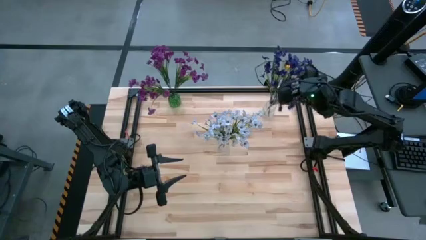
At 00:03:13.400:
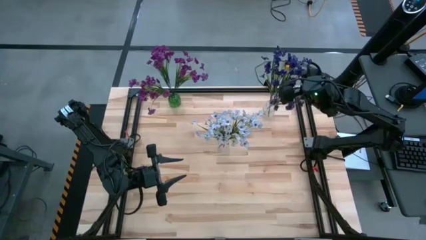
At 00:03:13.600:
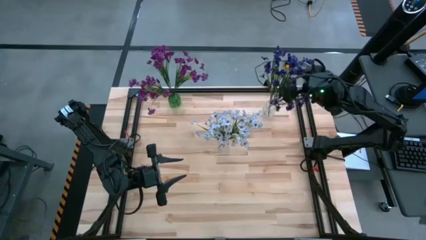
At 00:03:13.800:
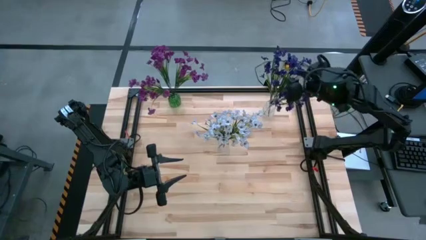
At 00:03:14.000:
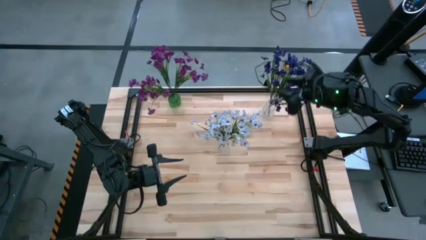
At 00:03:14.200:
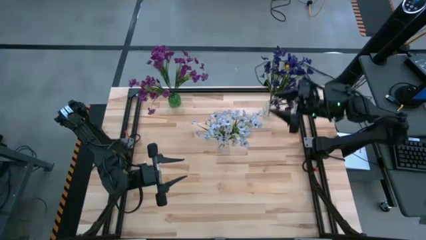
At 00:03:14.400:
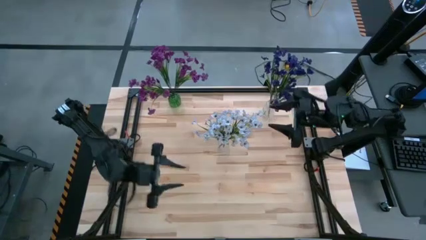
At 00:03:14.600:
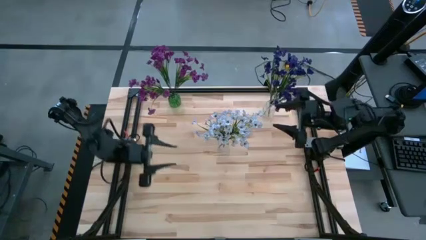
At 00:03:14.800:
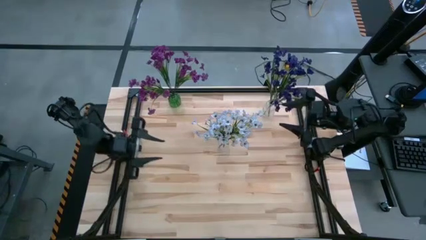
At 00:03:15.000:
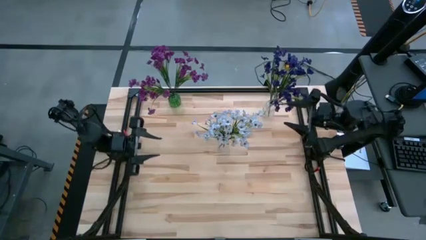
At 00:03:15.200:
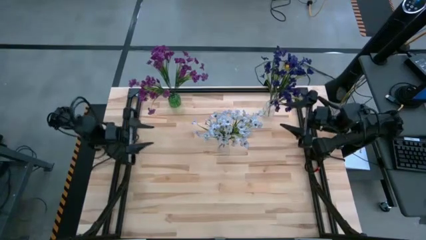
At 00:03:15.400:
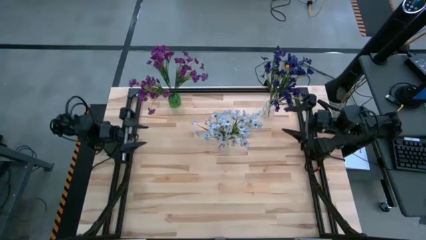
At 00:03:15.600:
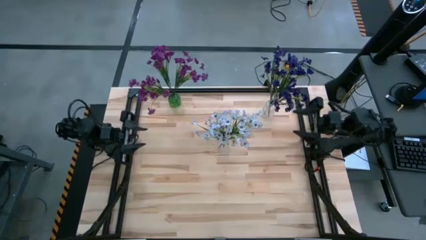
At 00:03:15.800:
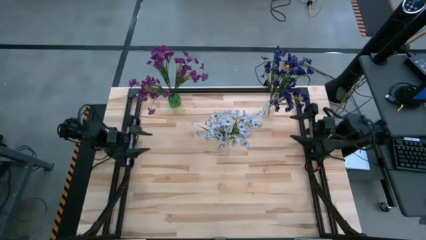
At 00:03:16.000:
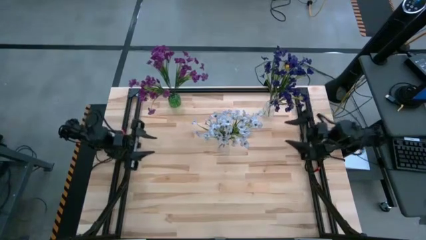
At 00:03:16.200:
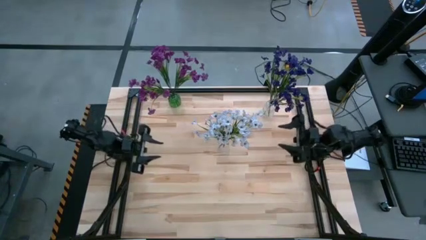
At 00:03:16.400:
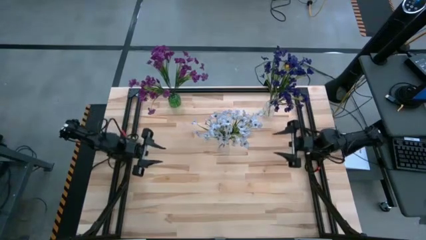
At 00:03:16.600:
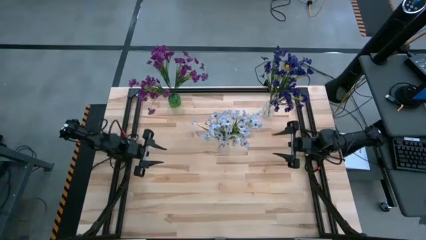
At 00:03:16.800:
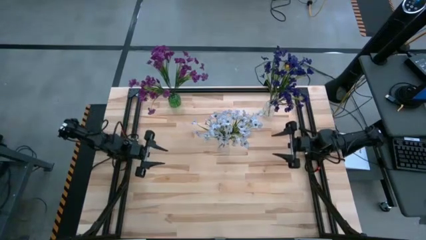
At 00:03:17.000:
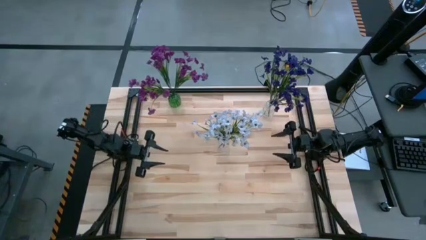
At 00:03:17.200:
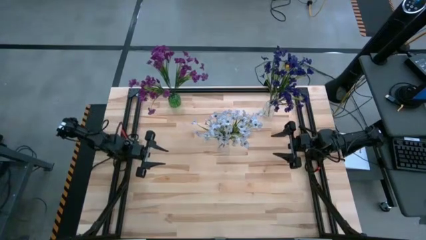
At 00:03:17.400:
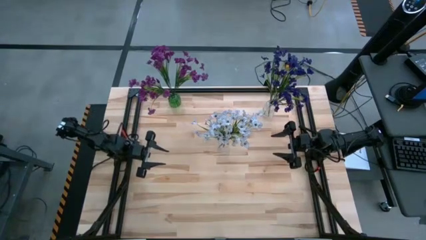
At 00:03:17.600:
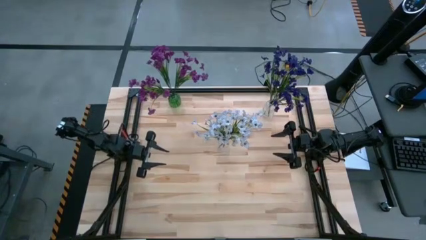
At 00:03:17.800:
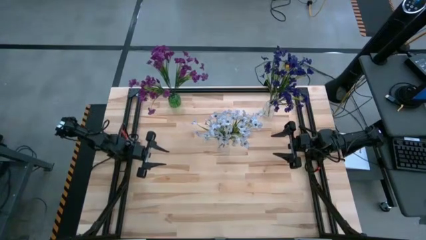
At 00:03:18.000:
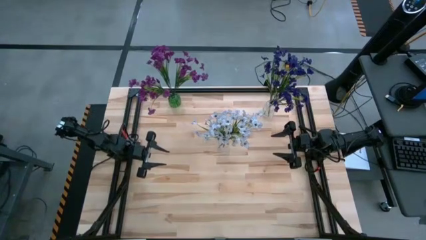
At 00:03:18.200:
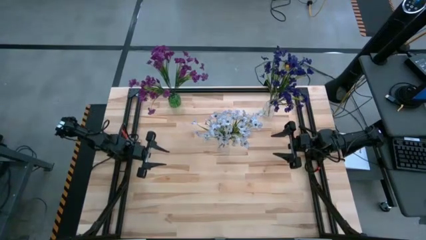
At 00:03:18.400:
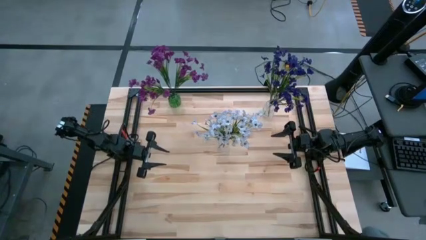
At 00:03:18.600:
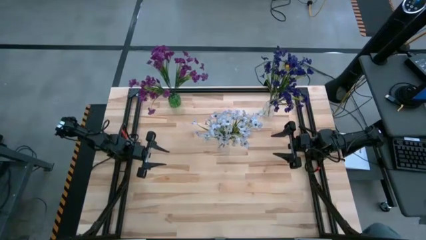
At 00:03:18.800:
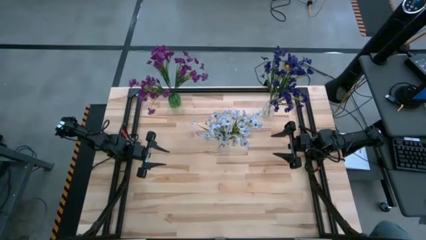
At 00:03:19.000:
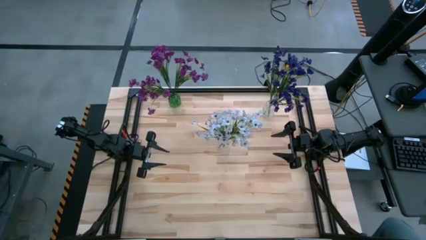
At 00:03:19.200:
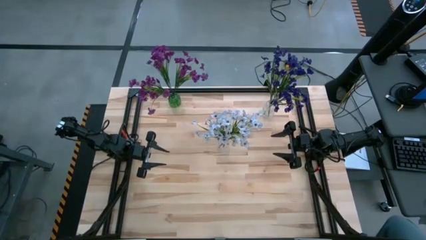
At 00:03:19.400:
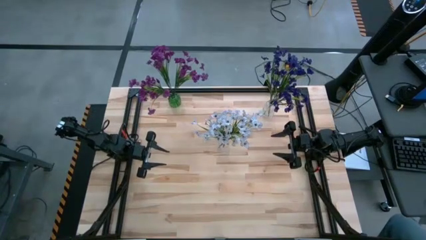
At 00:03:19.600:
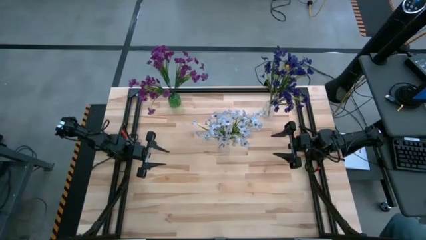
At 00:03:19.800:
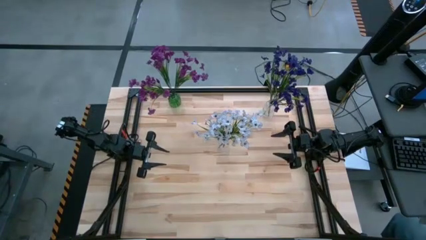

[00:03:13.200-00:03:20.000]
Task: Sort flowers into vase by color
Return to Home Position

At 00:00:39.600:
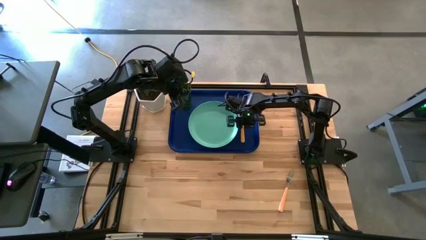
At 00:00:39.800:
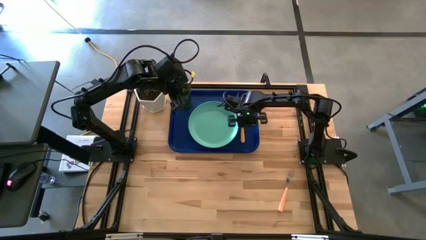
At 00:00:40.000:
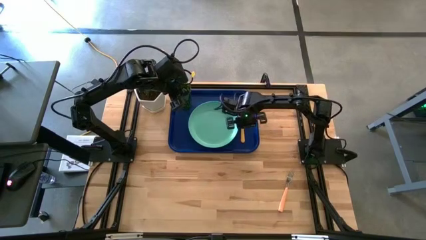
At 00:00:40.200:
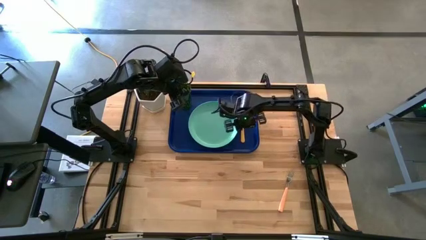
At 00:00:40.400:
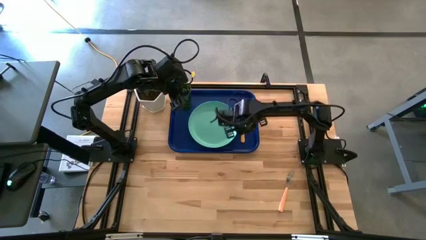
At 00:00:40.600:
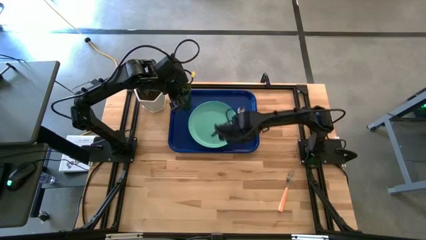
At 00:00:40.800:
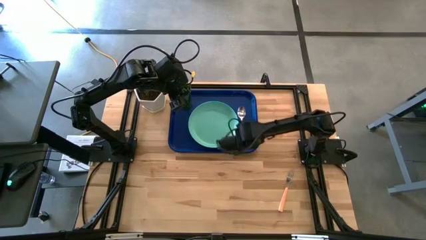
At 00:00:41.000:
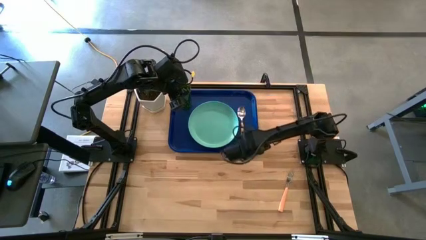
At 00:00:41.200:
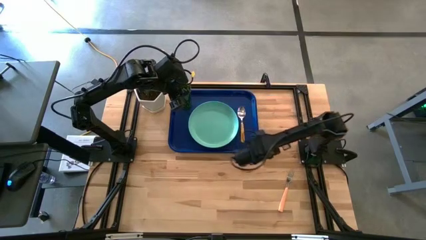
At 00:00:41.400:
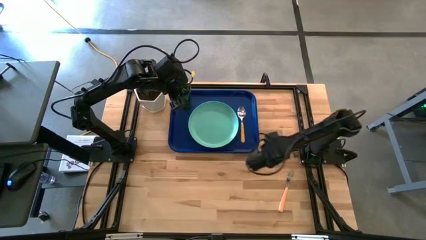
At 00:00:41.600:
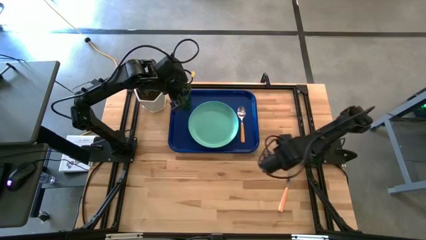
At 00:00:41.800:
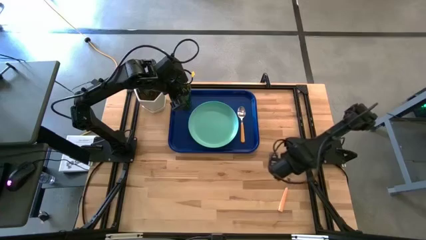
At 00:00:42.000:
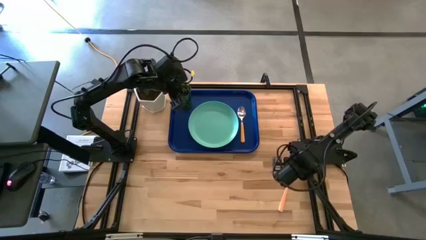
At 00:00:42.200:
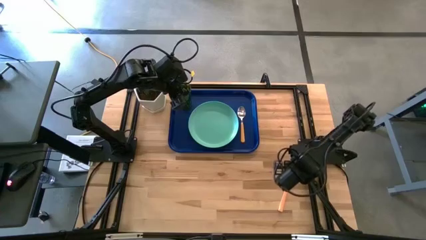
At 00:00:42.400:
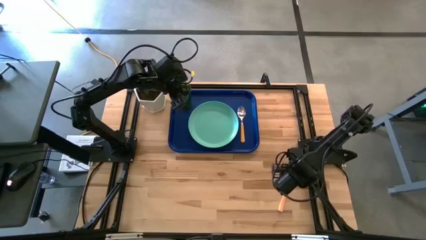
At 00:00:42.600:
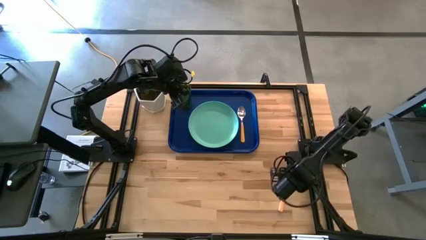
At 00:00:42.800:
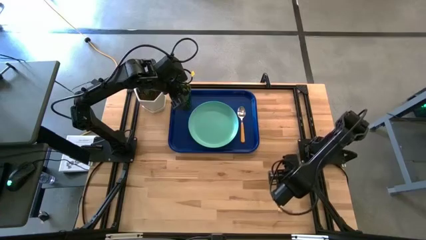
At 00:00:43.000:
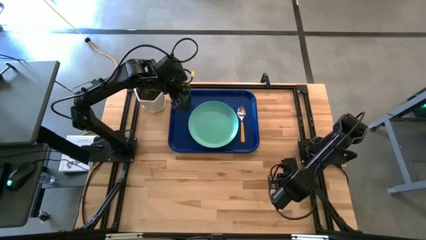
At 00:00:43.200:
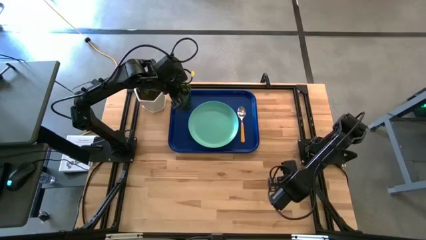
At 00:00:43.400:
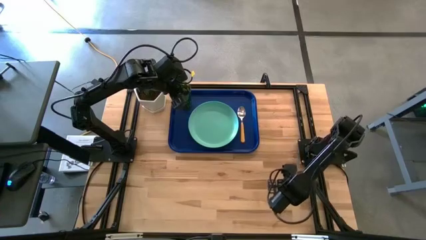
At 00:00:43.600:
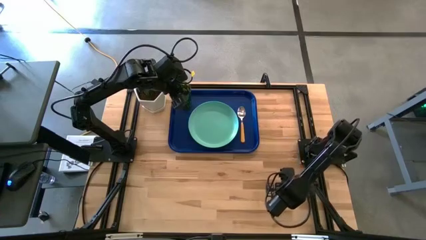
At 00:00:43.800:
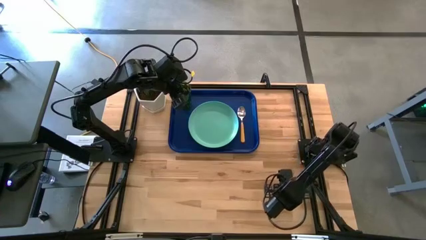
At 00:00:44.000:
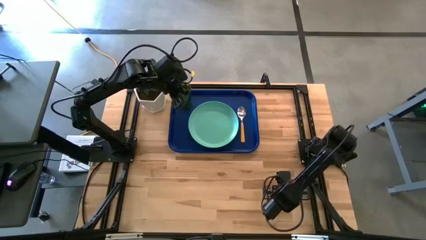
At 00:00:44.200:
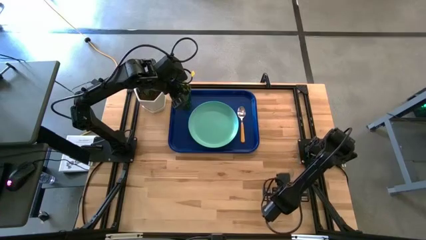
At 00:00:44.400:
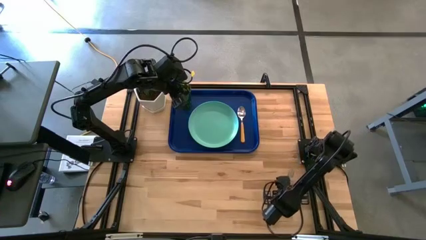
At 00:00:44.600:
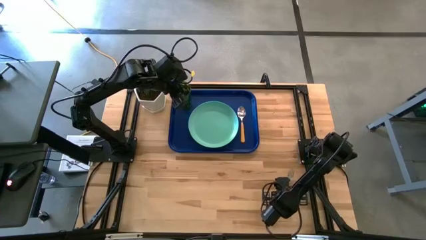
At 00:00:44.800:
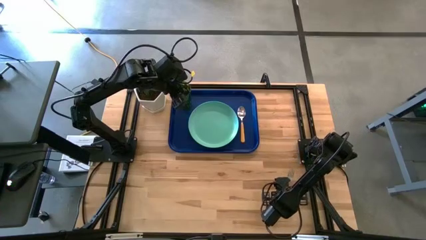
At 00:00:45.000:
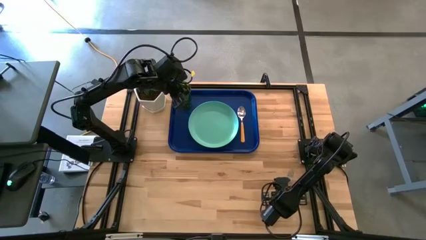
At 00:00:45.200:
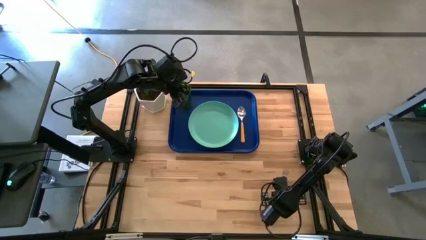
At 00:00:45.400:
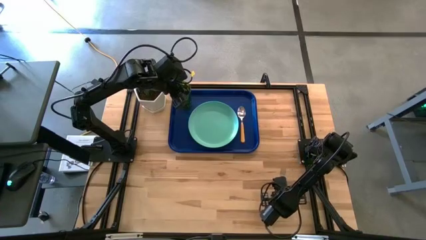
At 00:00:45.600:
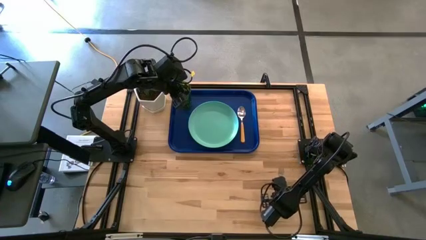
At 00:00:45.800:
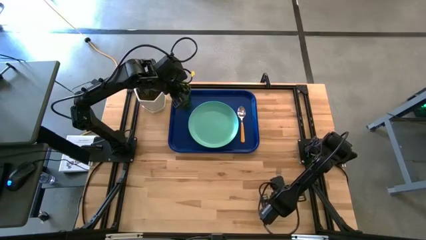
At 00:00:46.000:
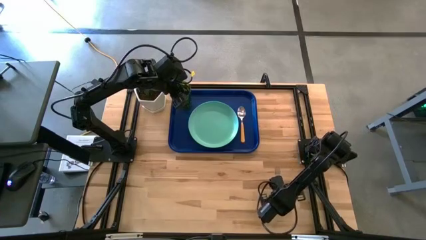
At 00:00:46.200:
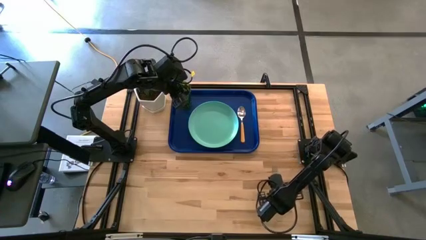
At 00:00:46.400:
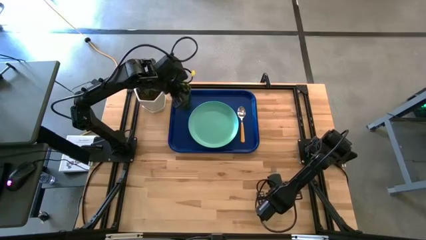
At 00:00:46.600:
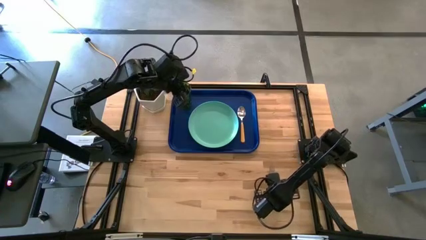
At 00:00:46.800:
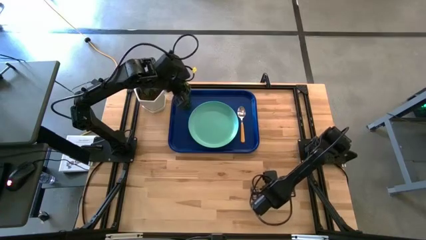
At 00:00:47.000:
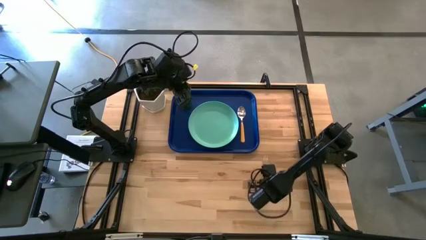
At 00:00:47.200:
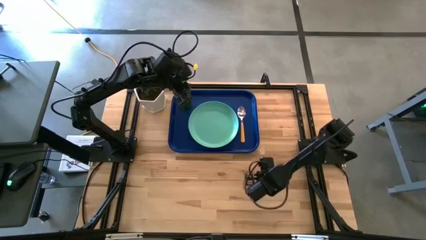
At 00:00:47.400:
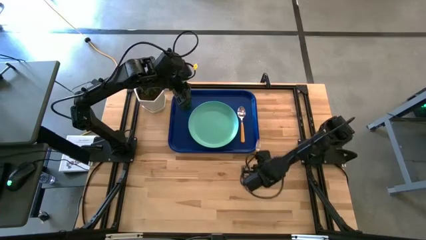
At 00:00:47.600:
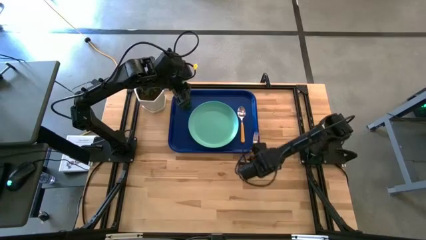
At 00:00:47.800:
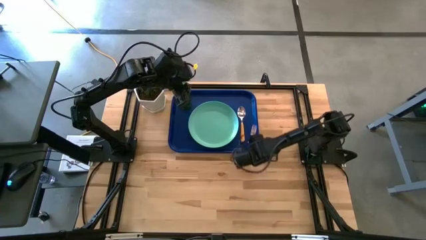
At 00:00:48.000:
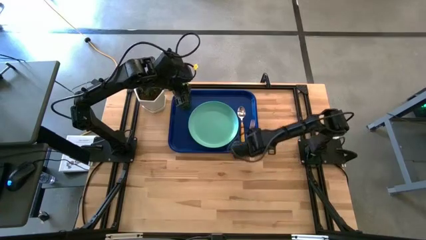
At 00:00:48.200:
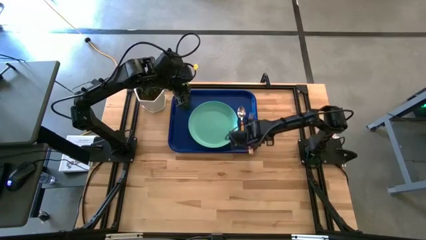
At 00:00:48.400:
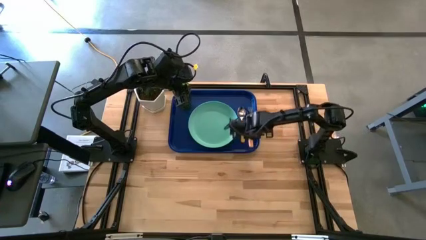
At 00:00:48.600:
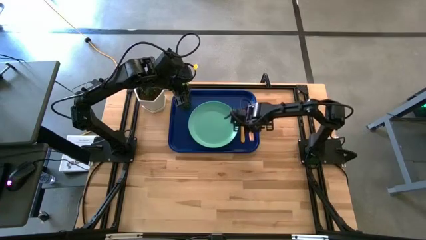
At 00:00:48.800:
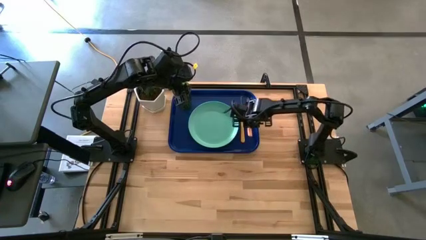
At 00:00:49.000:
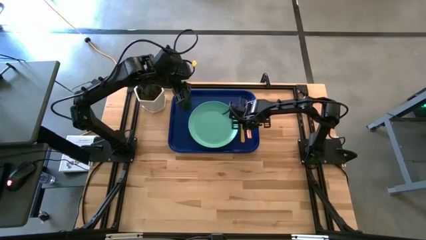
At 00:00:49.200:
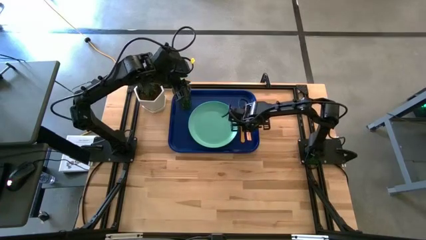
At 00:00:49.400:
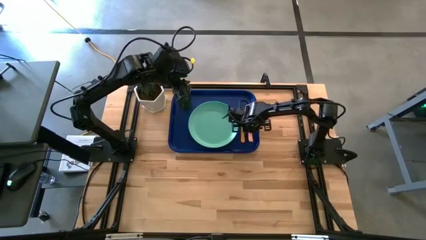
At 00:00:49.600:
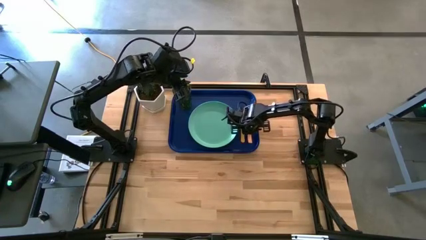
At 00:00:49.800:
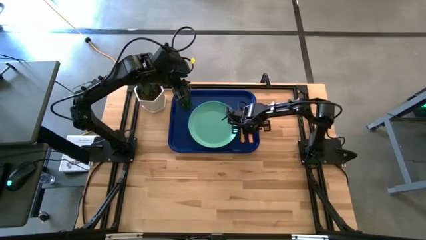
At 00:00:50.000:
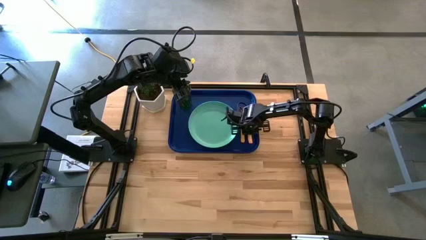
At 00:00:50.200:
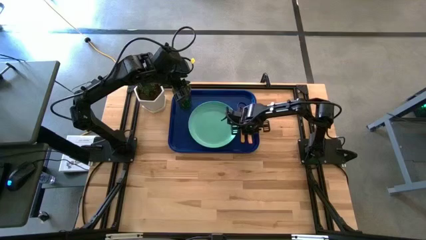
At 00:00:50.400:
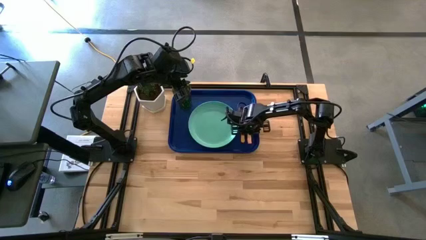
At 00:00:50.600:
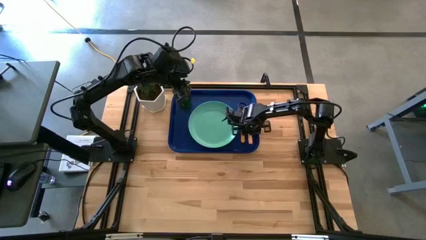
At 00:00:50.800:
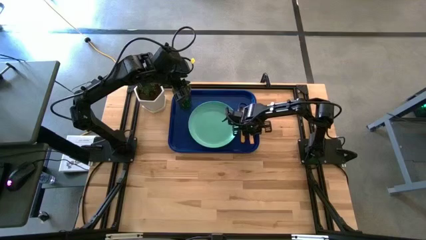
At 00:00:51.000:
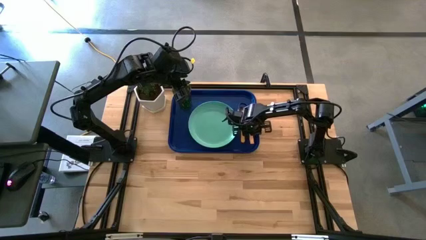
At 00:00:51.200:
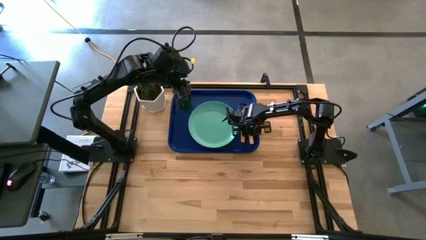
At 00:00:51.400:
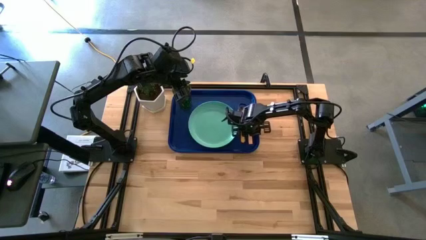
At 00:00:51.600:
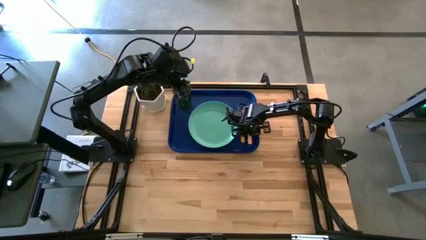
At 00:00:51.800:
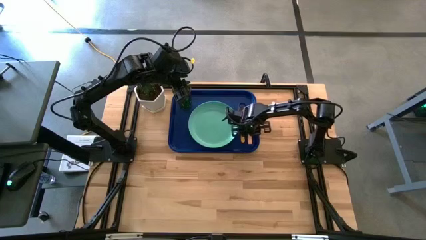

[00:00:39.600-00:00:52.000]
Task: Pick and place plate/cup/fork/spoon on tray
Put the orange fork on the blue tray to the right of the orange spoon
